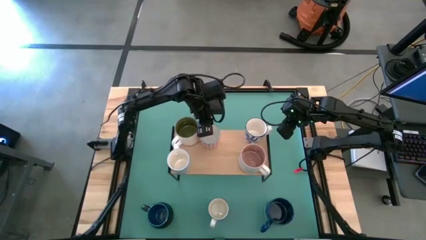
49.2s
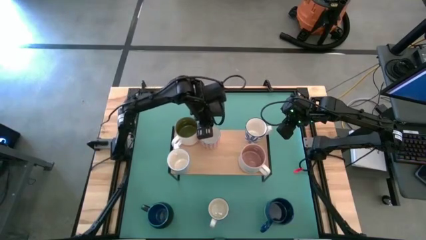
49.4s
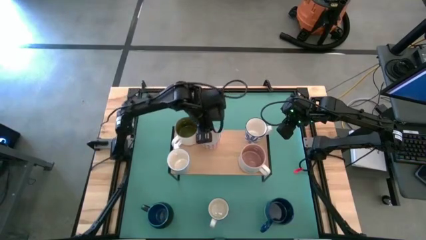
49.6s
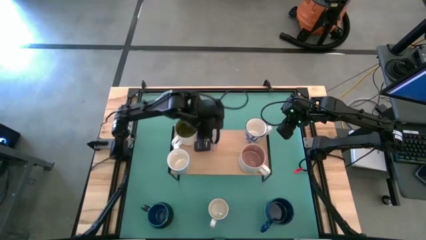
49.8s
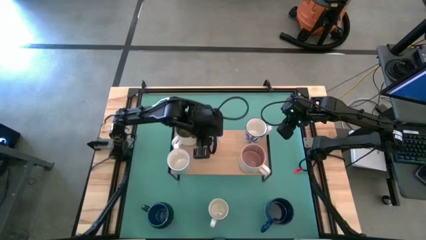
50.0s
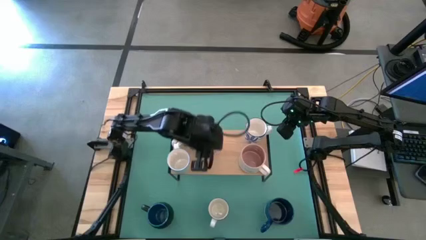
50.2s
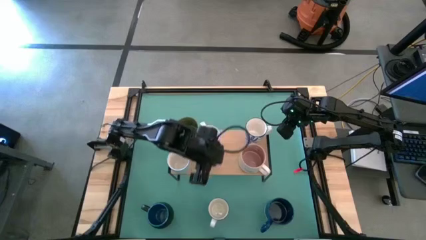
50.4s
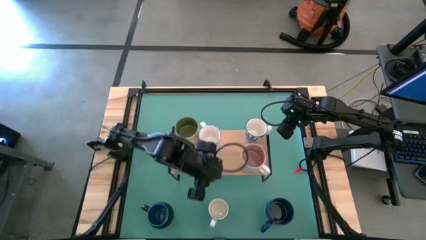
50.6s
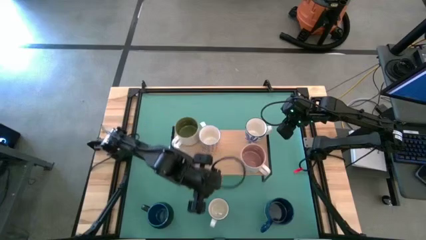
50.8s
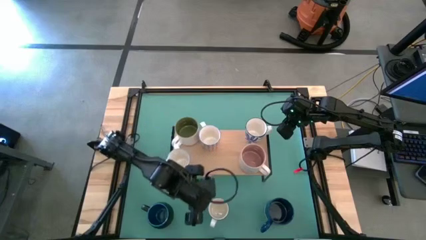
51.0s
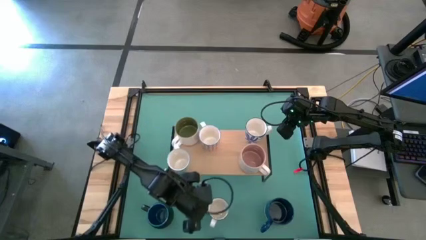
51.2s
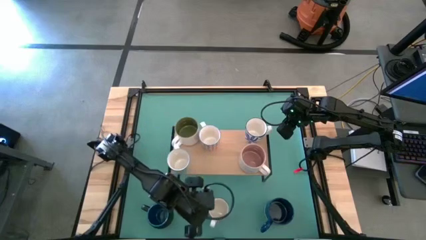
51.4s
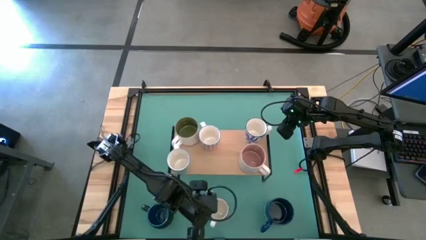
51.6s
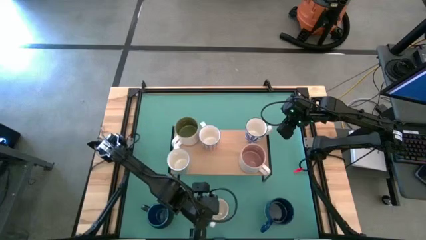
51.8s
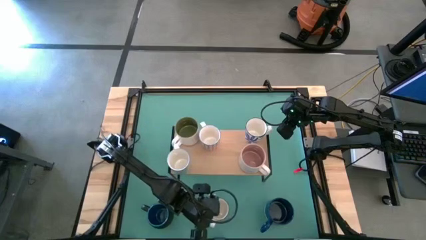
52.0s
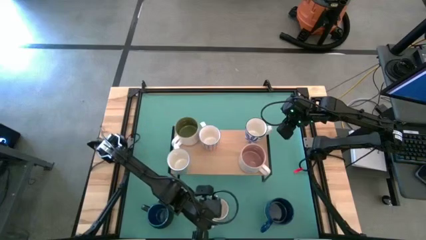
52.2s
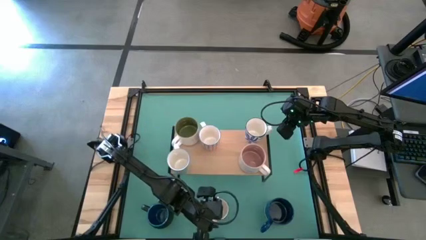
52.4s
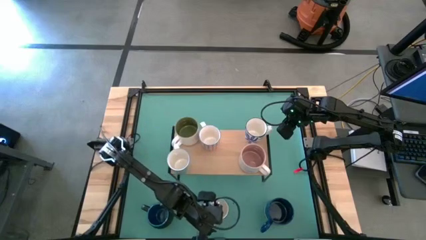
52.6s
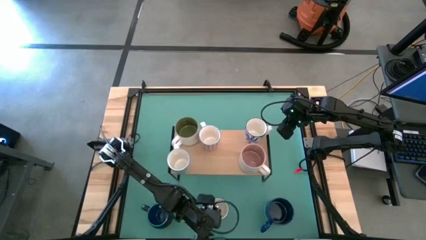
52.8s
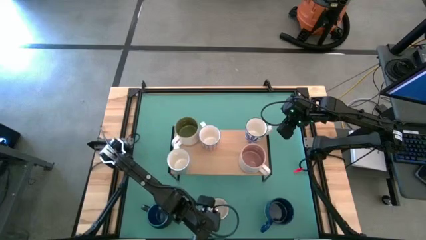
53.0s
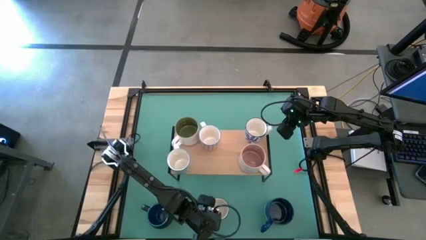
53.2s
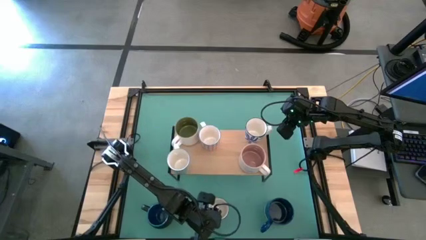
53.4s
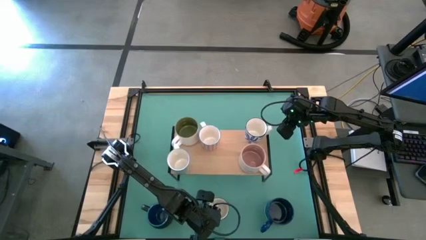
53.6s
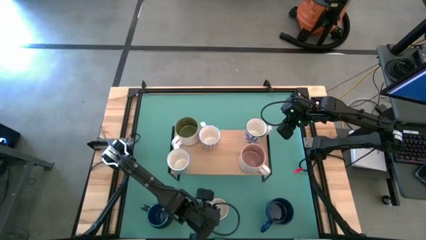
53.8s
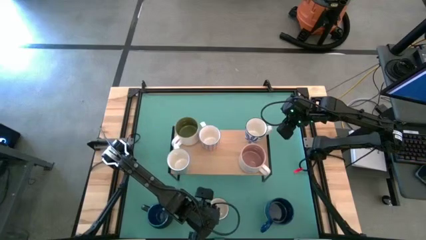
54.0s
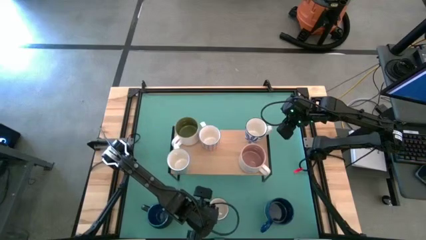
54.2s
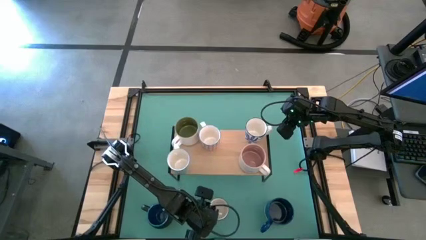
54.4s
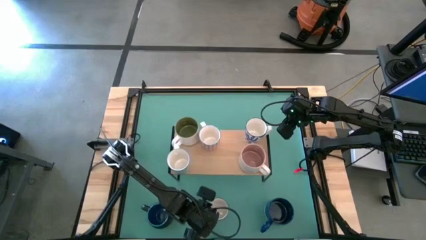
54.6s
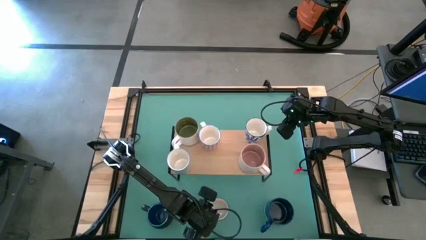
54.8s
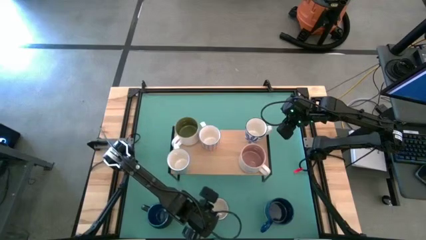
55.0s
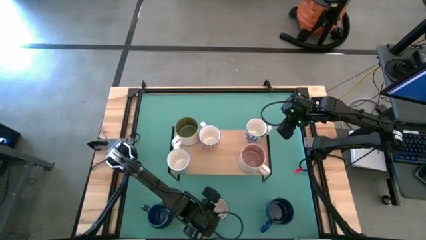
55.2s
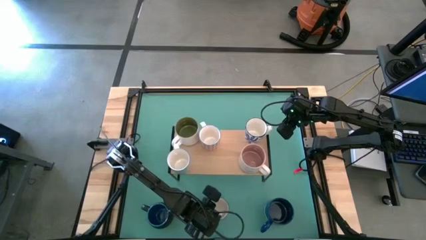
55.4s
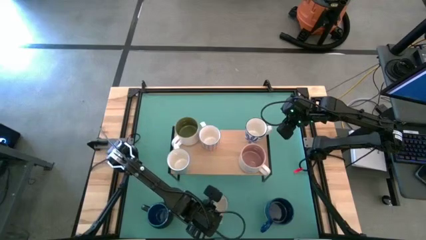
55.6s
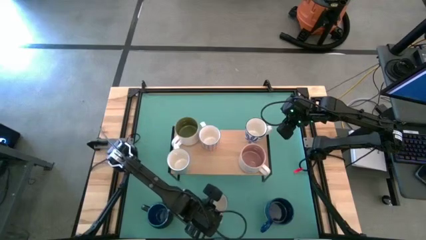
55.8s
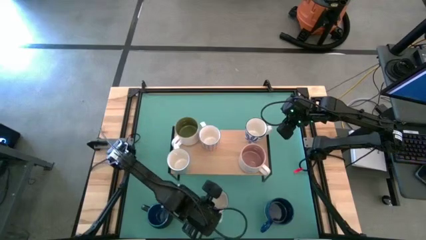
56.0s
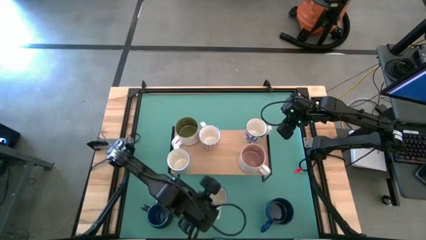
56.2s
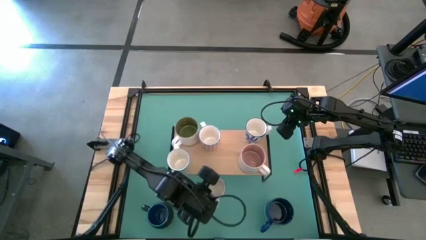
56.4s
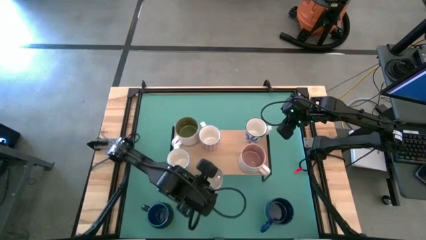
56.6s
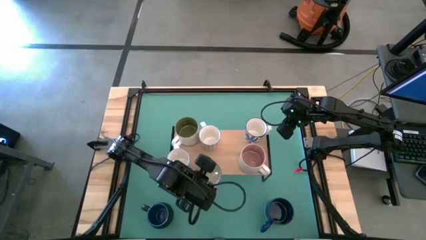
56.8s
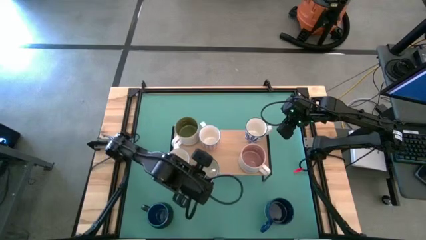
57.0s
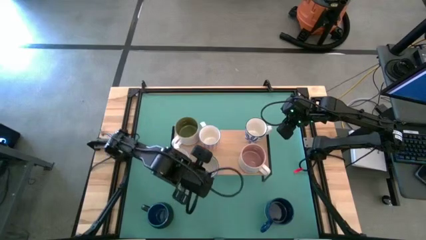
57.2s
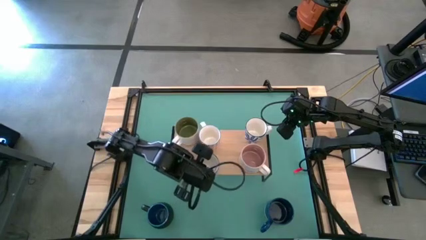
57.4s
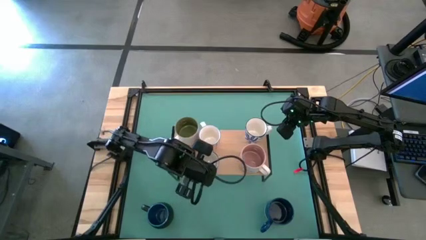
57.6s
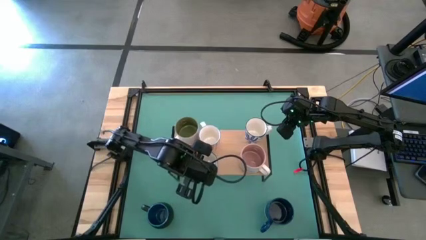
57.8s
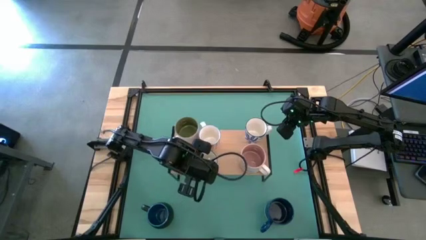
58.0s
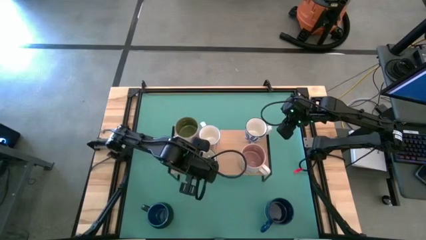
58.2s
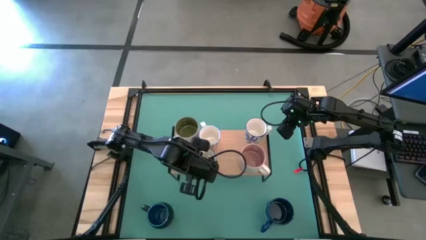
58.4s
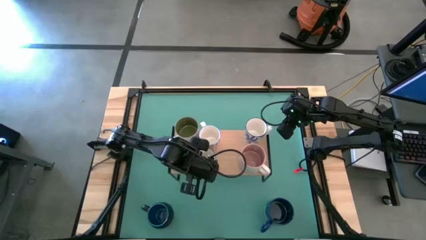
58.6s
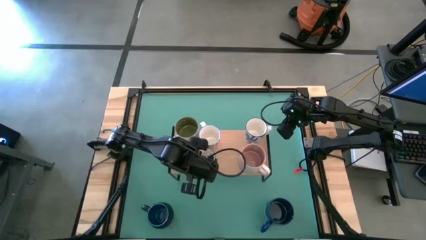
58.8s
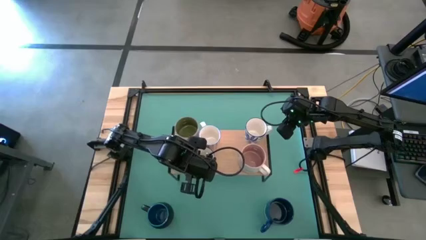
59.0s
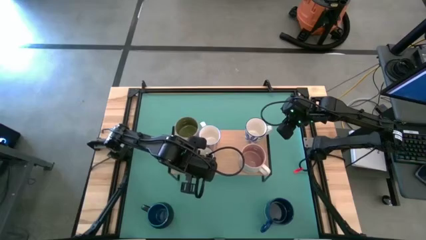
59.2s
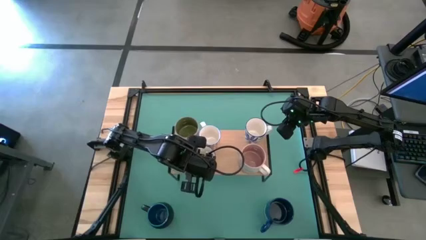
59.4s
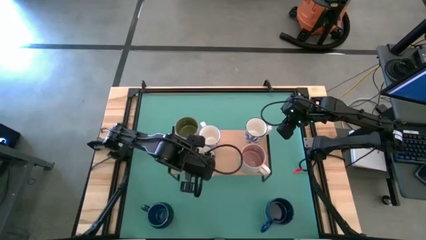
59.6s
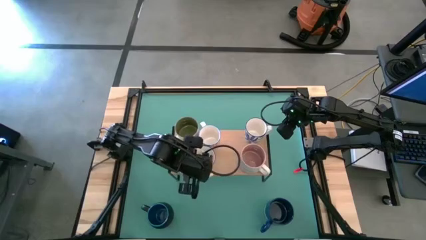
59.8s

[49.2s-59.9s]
Task: Place coffee mugs
Put the blue patterned mug on the shelf

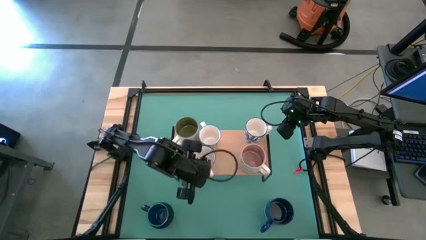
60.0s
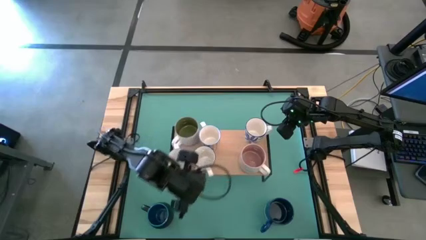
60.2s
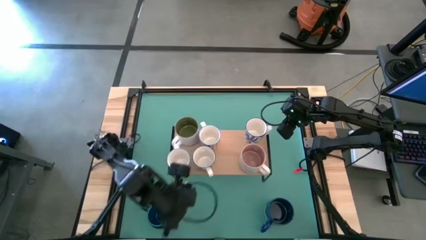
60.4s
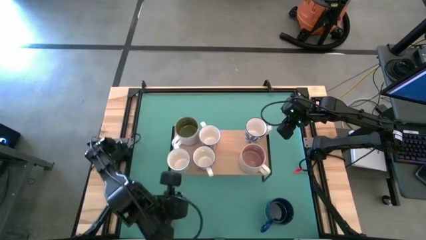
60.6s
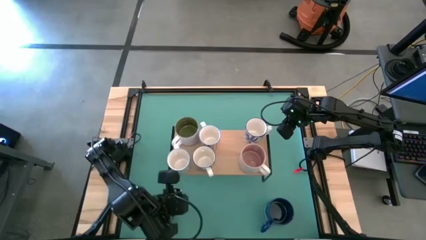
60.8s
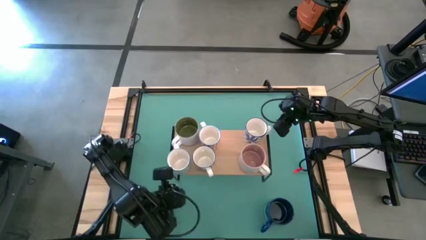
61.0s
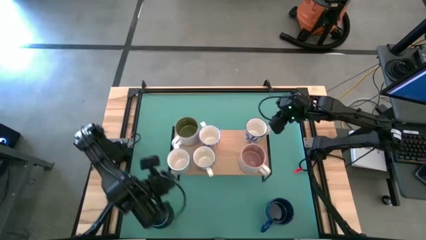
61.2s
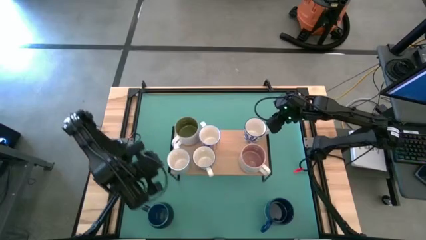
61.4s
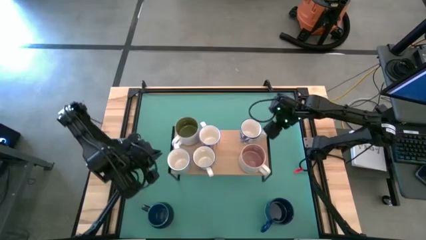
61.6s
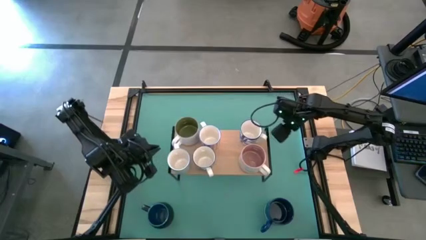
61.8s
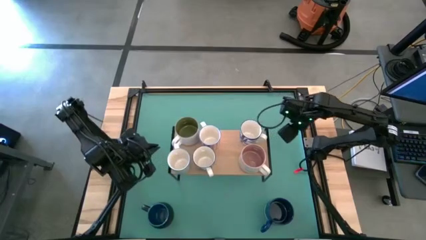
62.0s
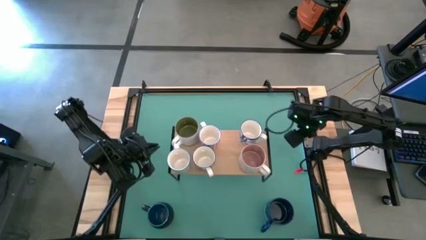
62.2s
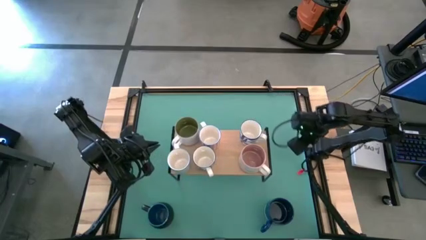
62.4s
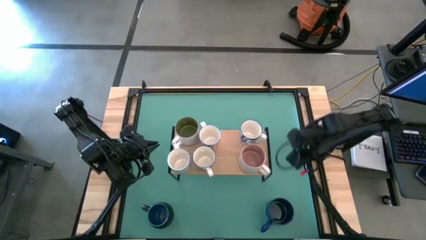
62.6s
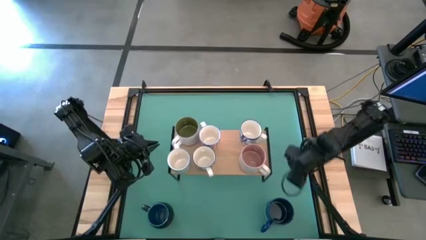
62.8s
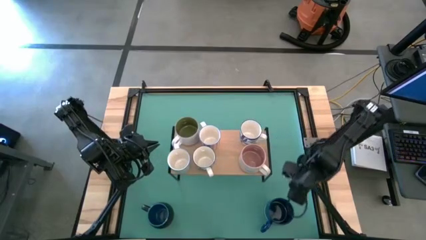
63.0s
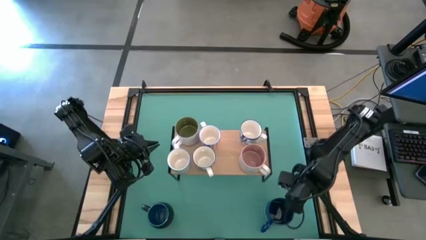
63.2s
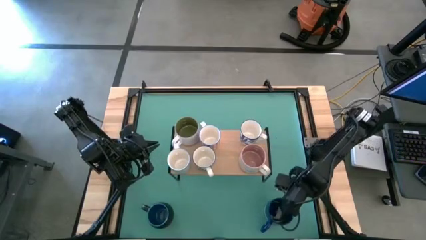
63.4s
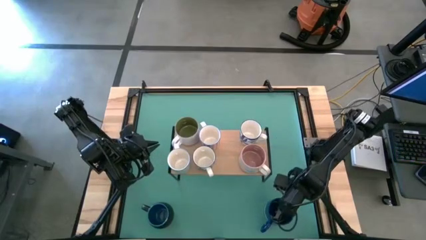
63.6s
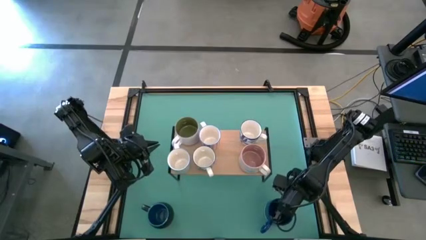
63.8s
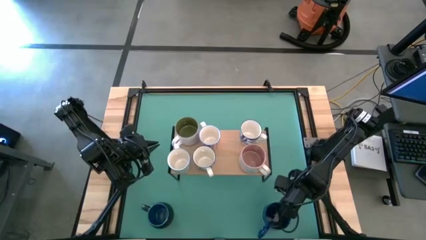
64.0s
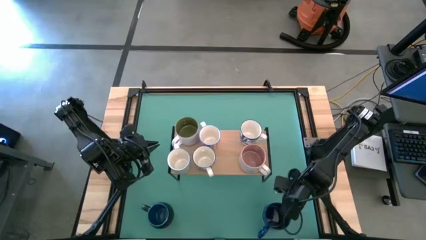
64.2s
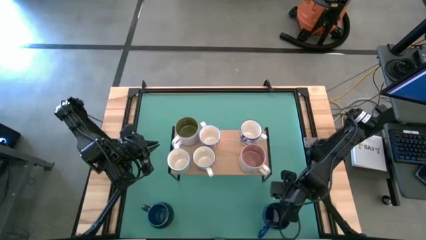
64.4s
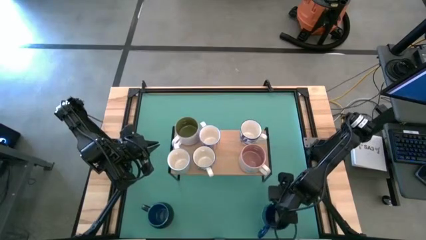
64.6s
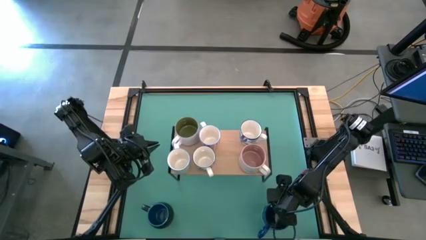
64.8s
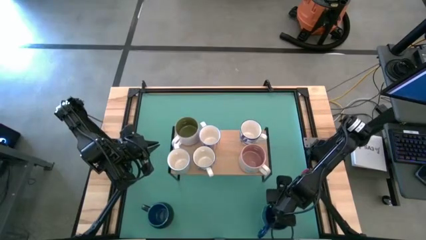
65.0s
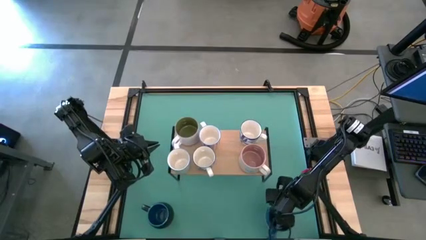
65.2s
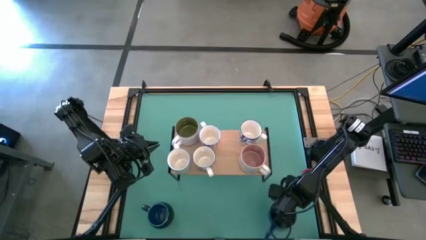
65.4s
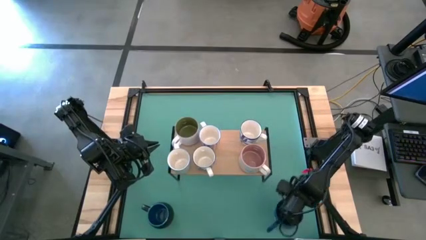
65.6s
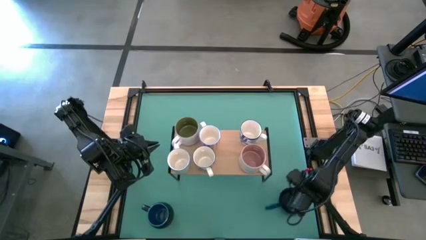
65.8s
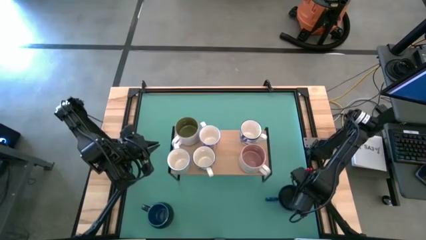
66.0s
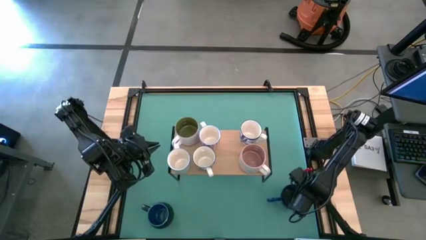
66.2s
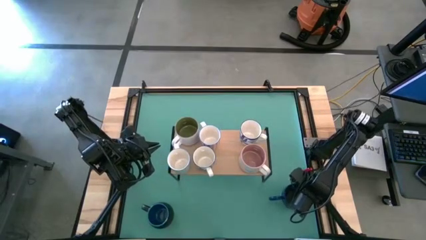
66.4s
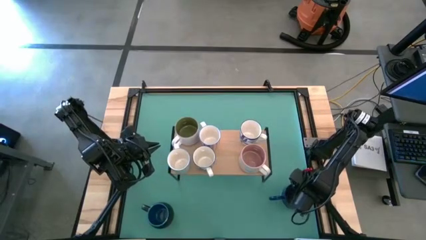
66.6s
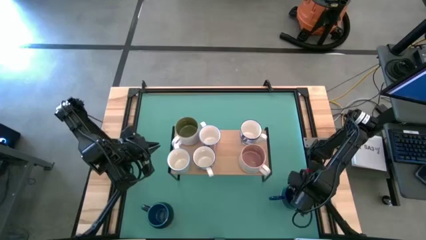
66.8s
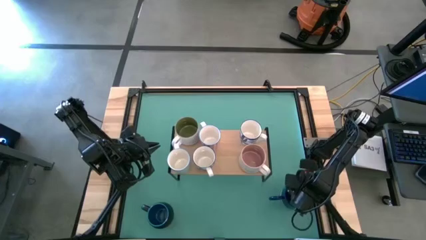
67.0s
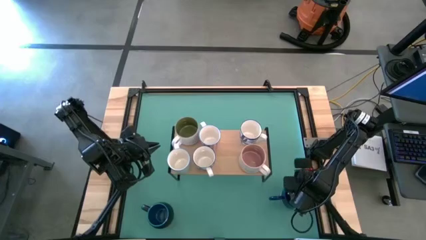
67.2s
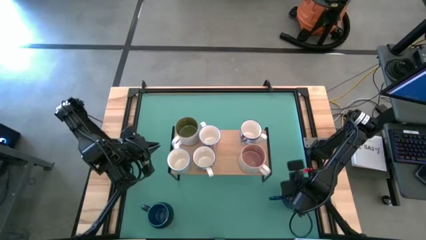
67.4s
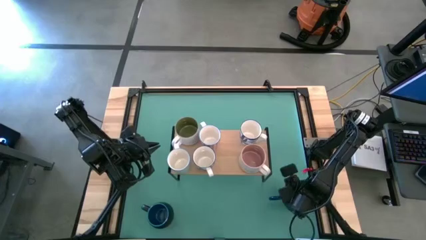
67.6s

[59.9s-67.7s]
Put the right blue mug on the shelf
